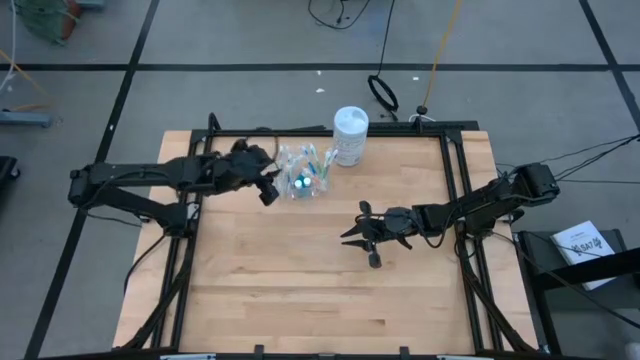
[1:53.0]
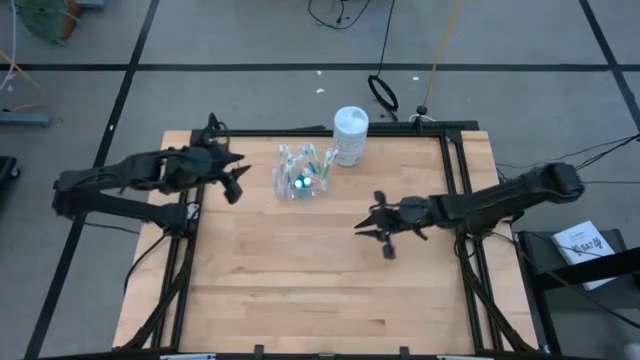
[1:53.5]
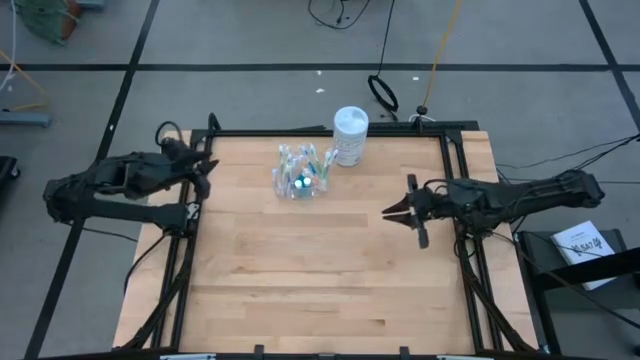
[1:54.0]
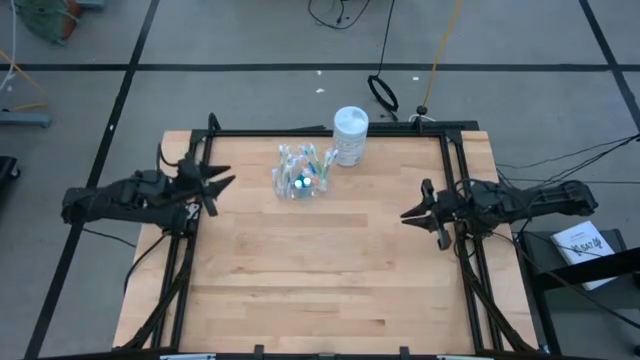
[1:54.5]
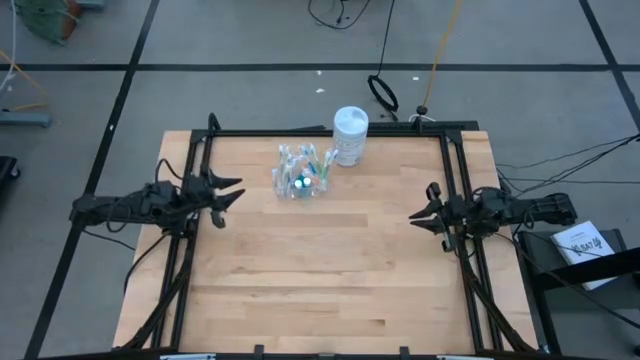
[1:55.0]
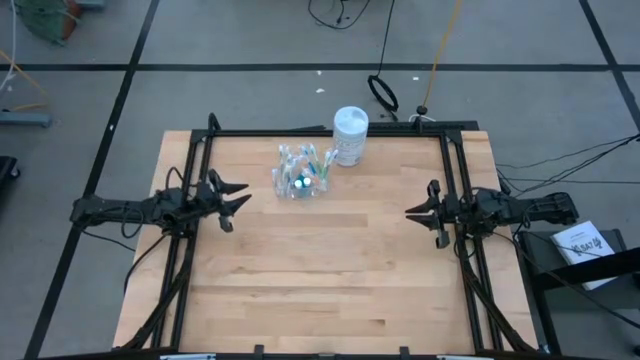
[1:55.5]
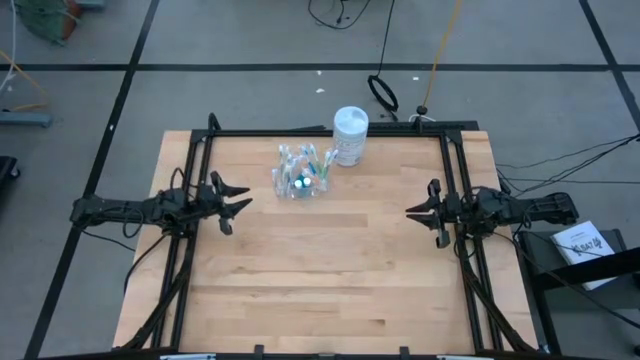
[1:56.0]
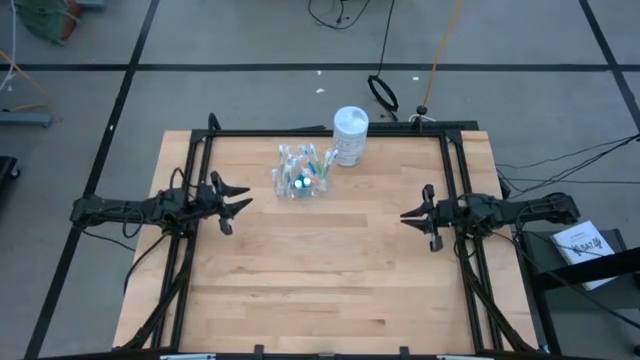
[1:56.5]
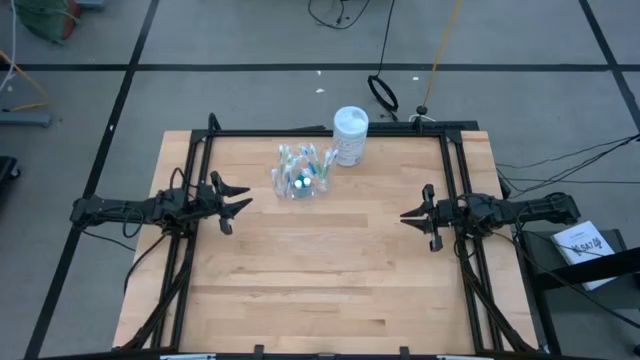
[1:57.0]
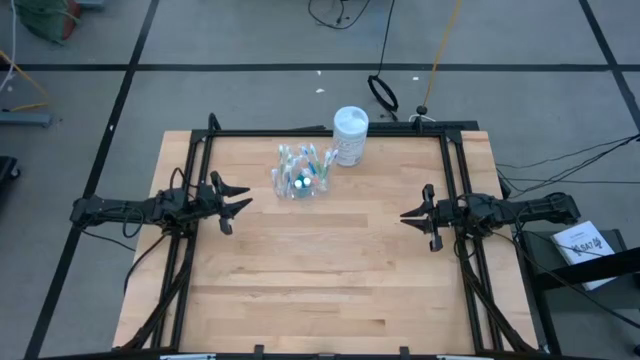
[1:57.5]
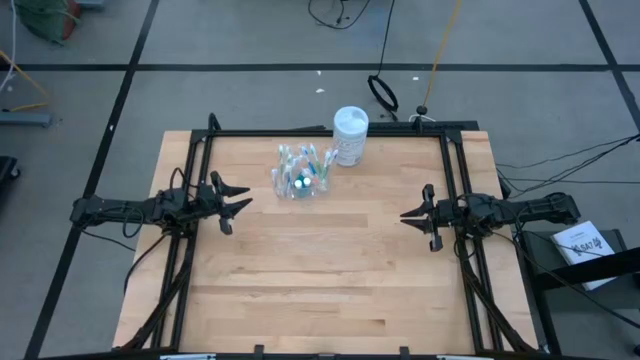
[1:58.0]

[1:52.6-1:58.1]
Task: Pick & Place toothbrushing station
Return to Home Position

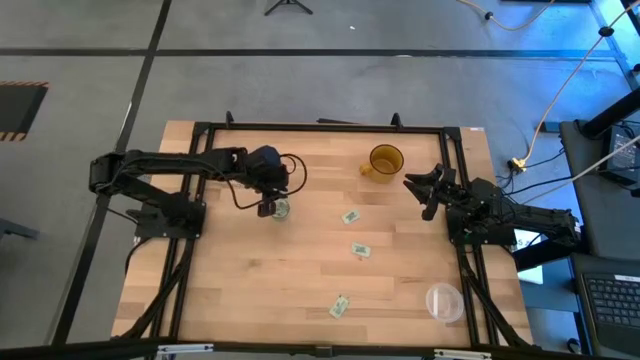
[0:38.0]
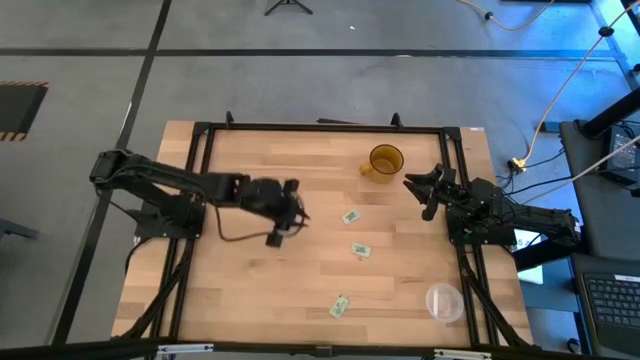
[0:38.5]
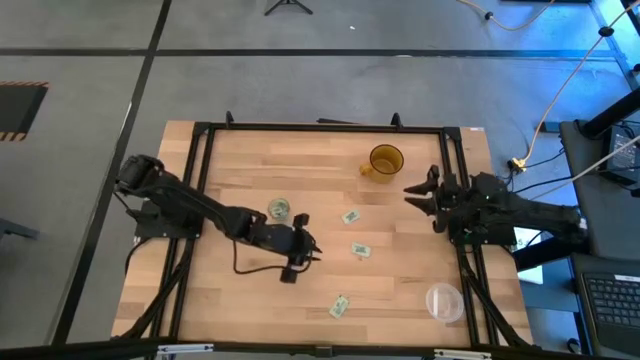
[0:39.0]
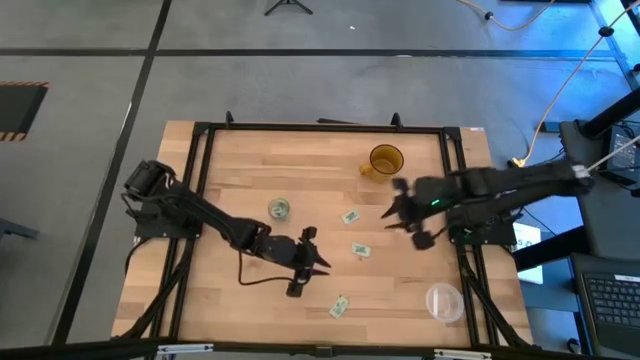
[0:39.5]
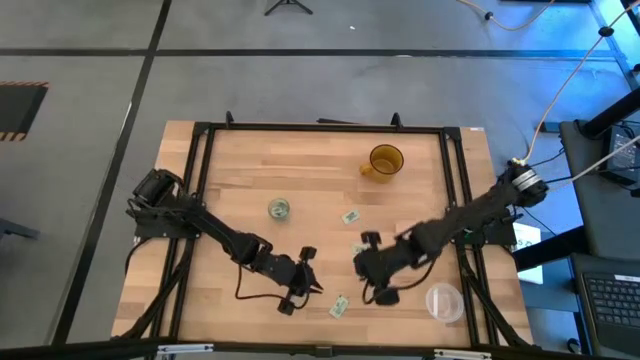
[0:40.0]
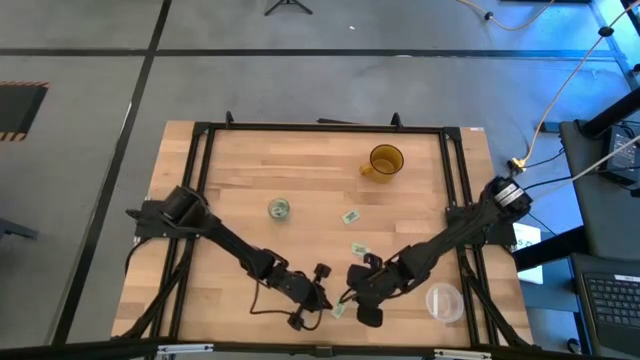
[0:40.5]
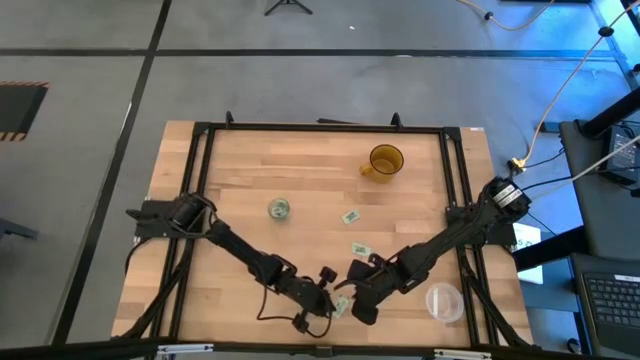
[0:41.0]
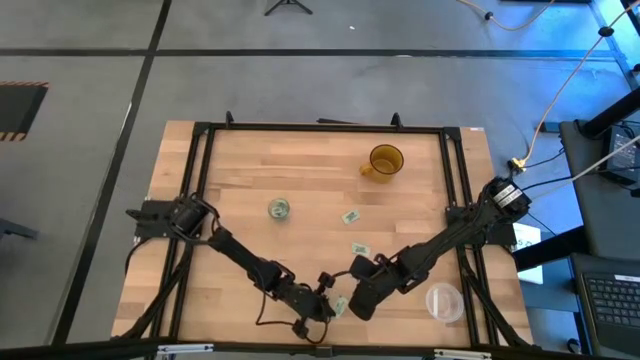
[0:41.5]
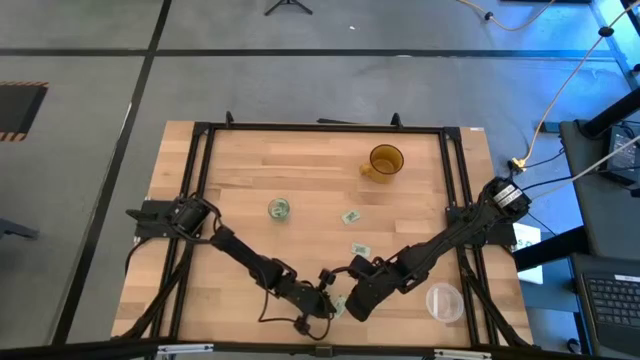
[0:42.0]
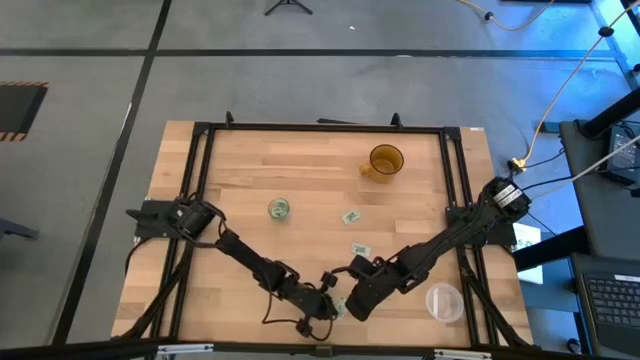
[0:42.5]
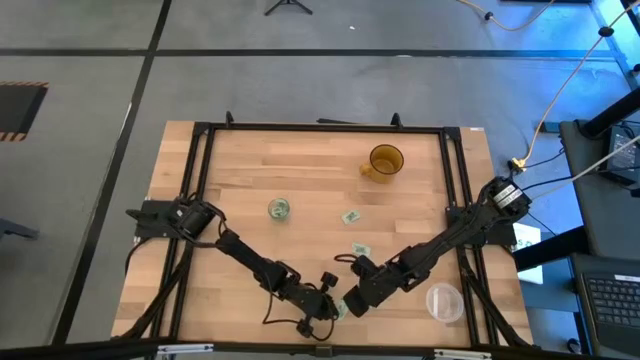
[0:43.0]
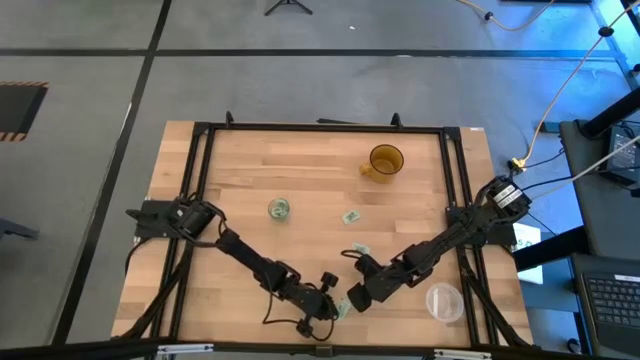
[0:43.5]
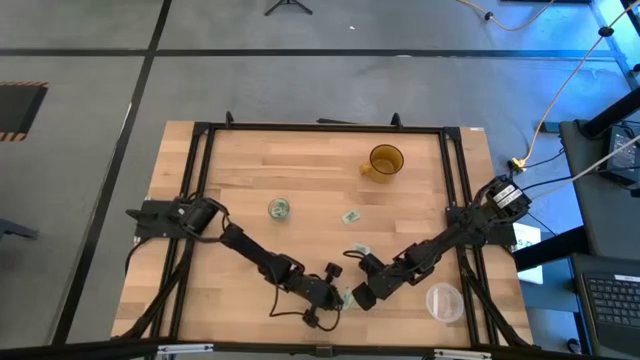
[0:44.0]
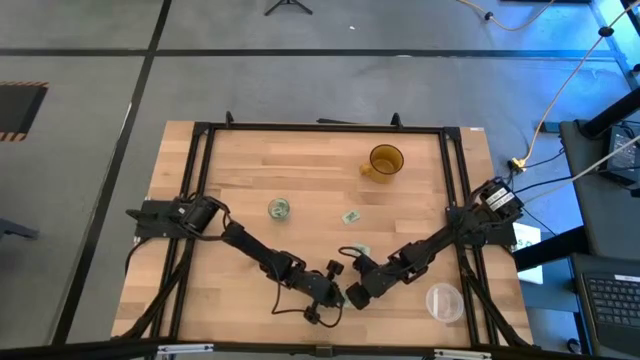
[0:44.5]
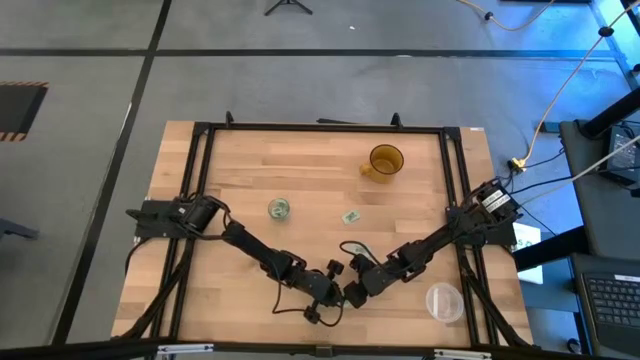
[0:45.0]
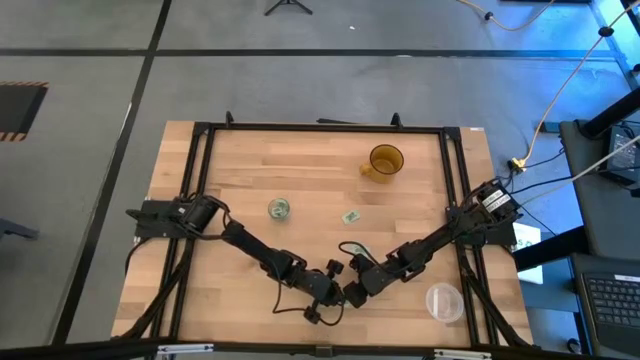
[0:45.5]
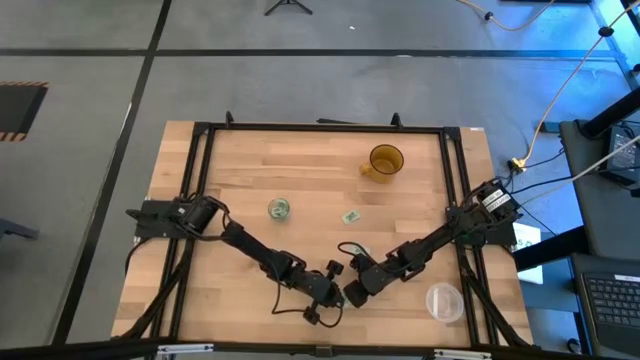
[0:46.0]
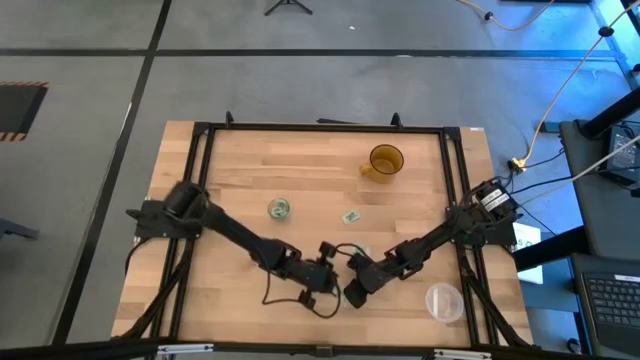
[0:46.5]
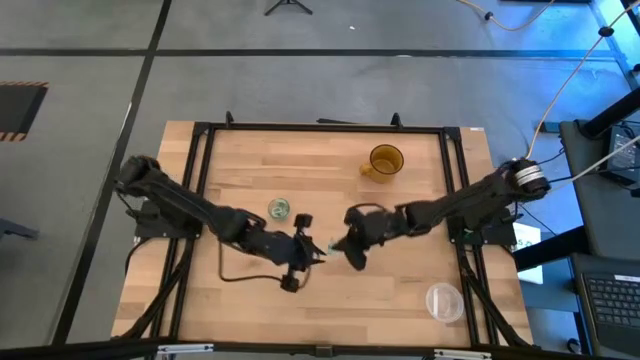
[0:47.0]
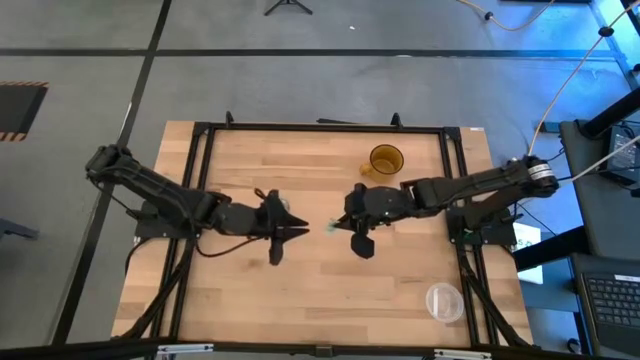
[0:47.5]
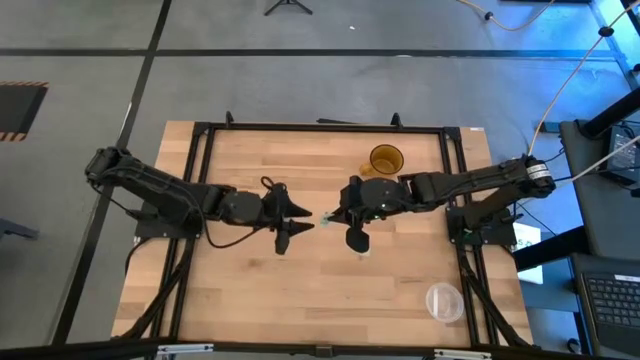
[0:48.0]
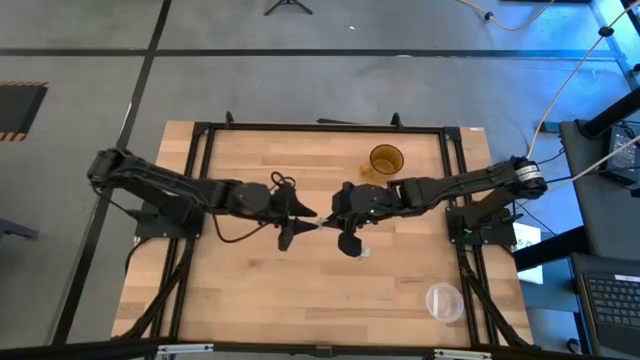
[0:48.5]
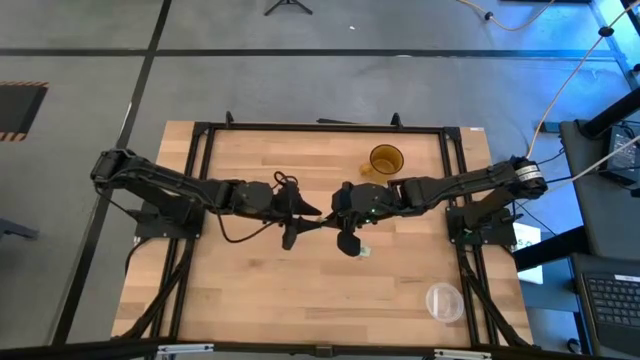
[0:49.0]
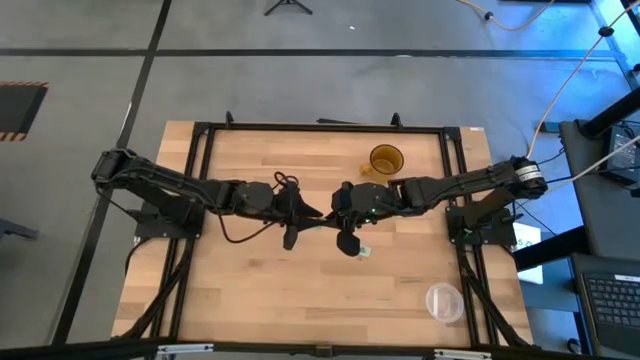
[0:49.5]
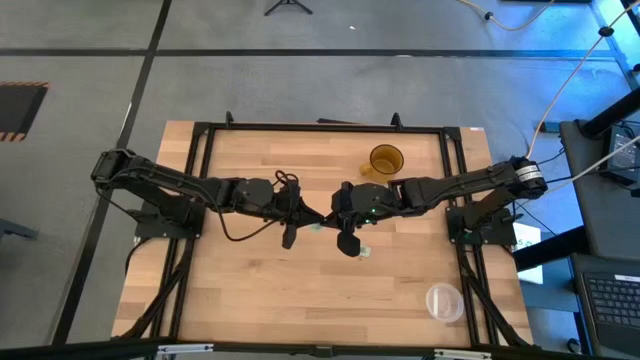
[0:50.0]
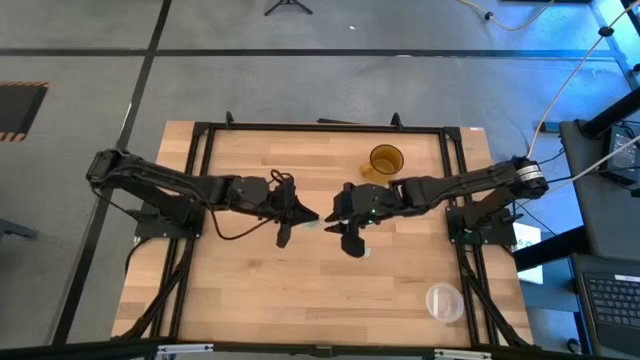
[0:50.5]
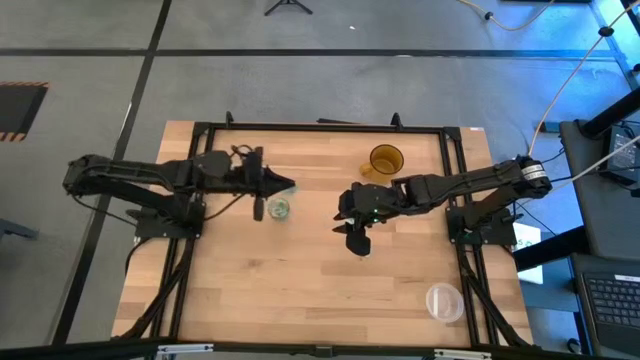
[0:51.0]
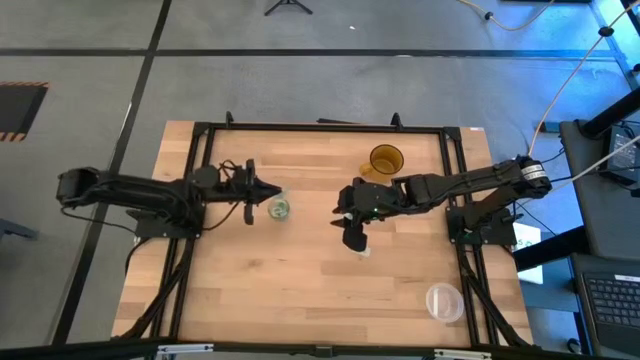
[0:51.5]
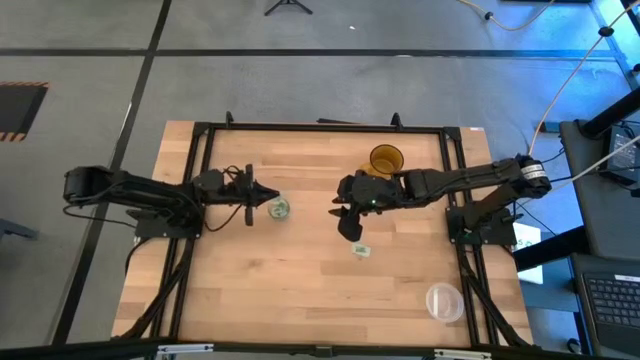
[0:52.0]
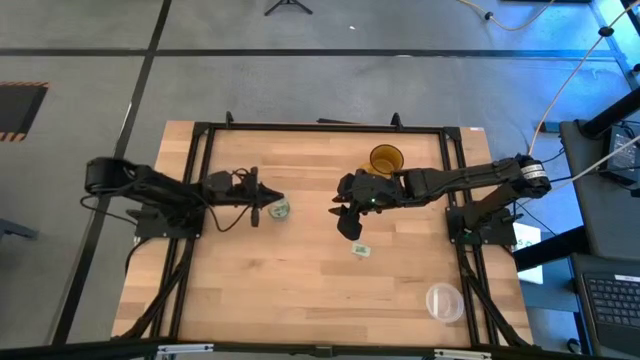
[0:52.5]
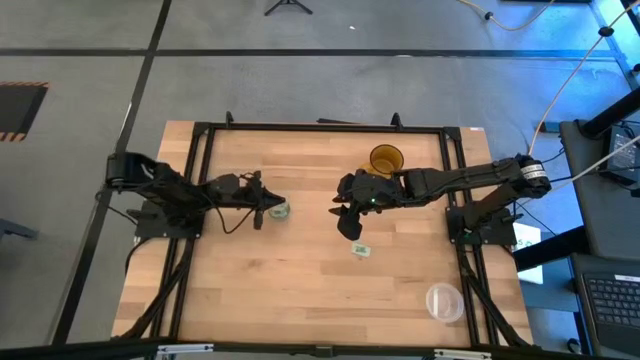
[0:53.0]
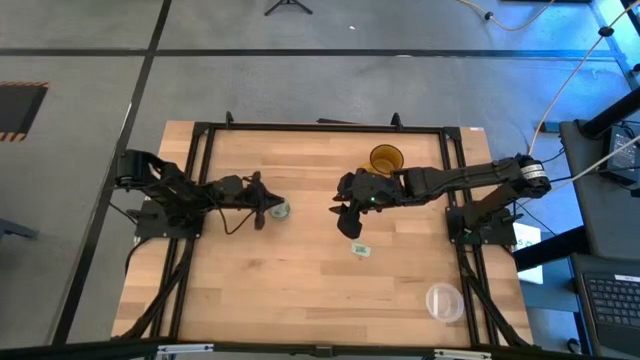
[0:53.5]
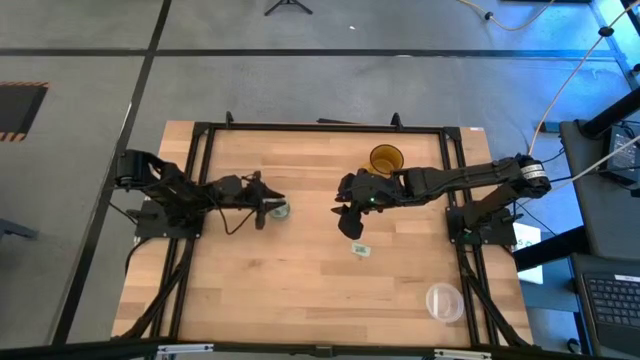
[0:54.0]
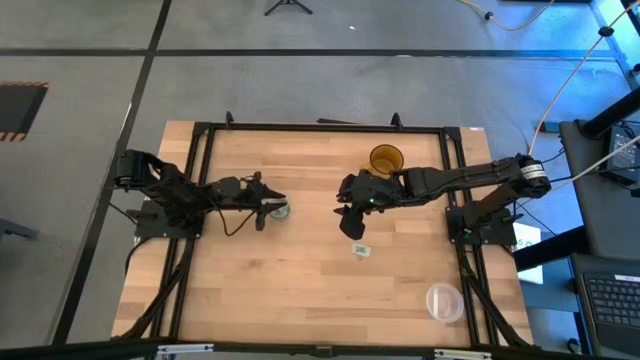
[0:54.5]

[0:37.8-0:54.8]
Task: Pick and place Stevia / Truvia into bins
Put the stevia packet into the transparent container
